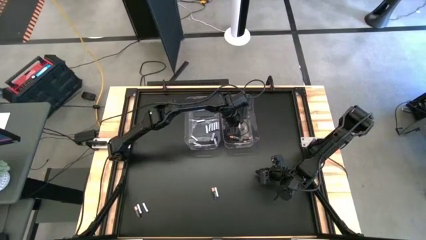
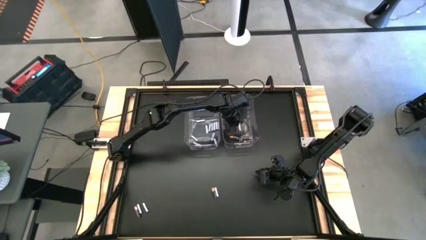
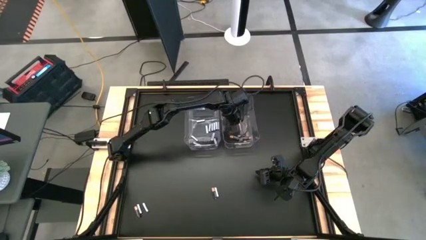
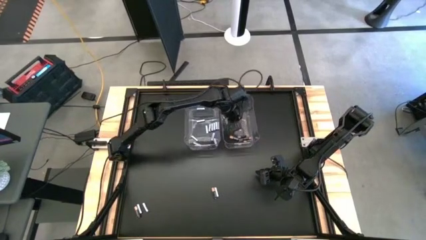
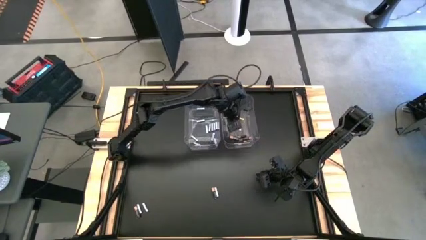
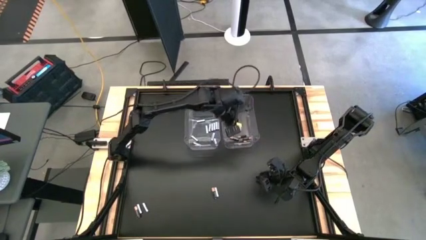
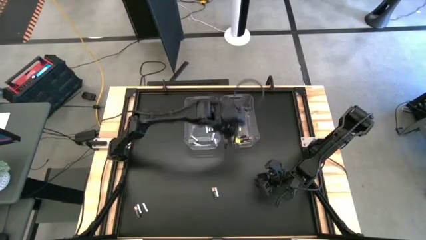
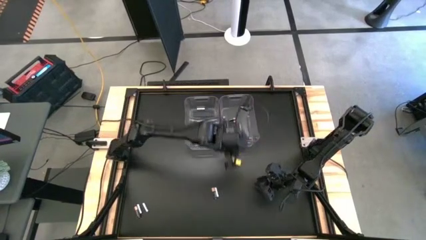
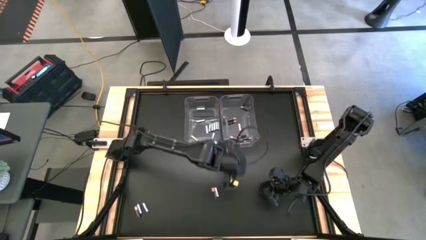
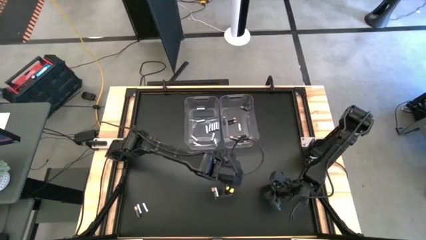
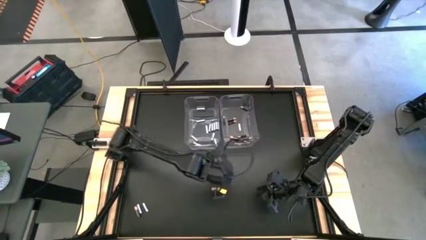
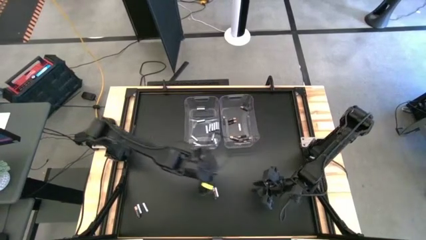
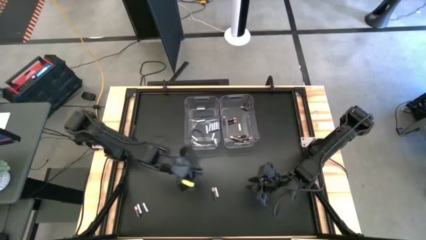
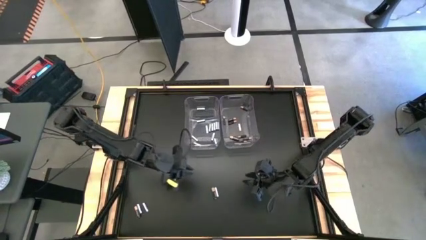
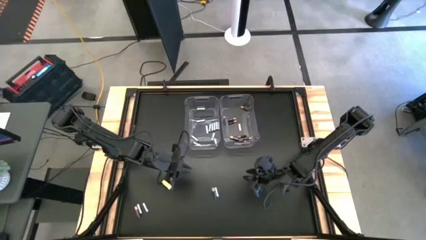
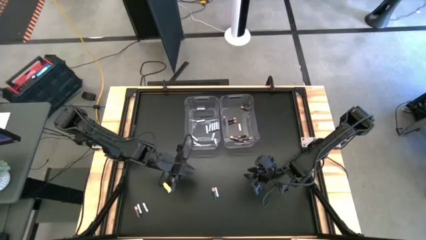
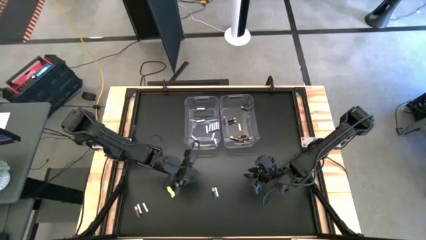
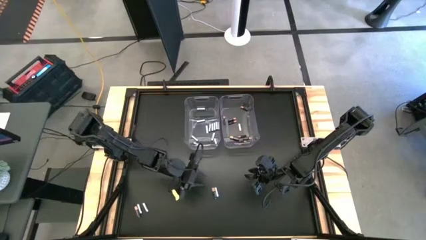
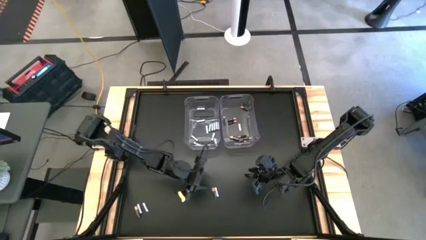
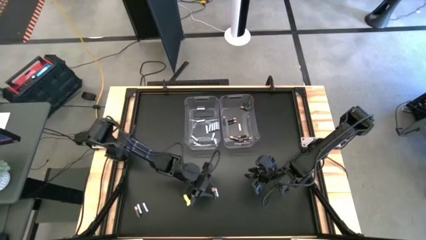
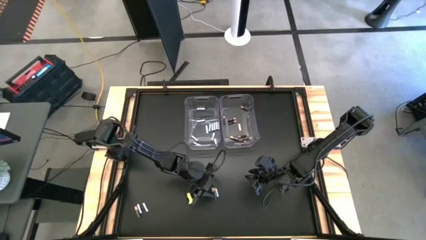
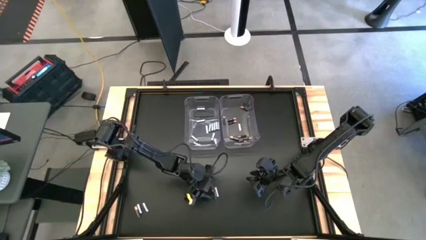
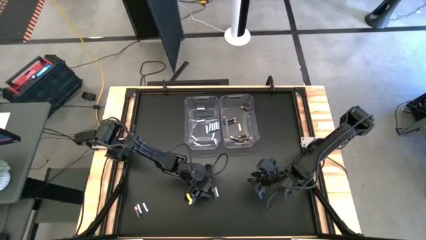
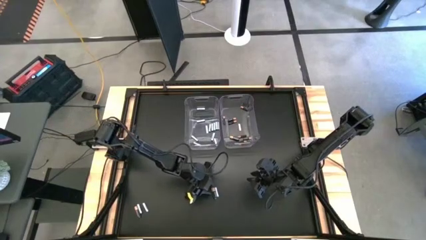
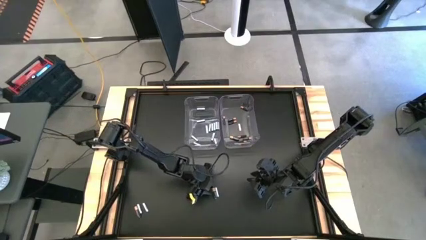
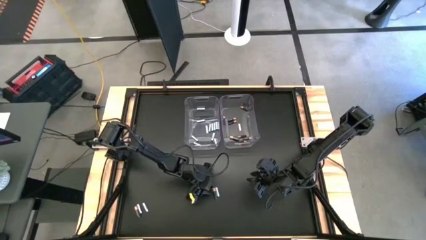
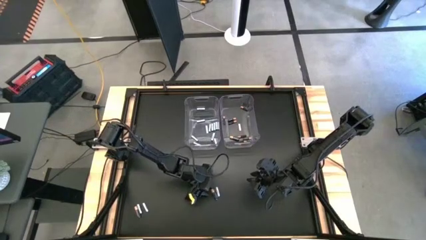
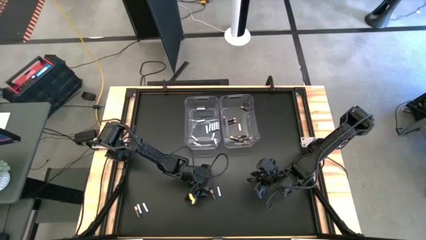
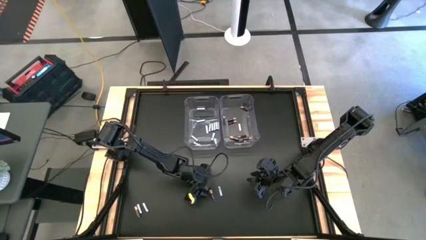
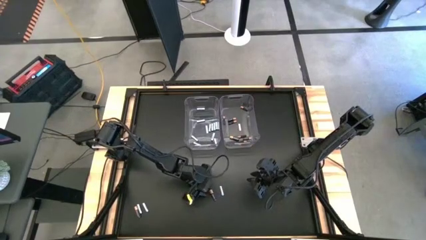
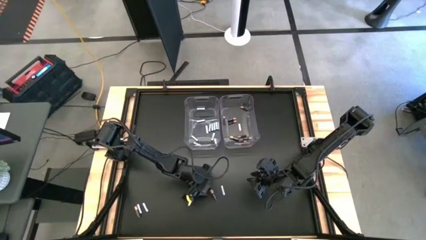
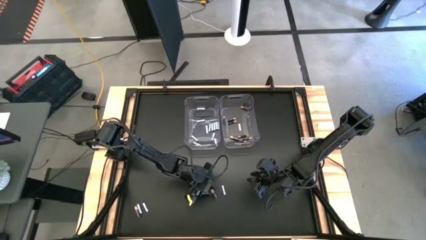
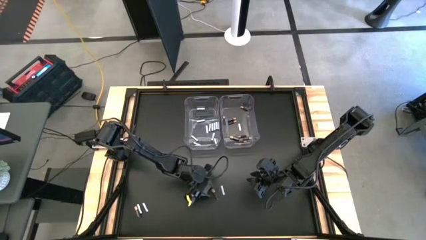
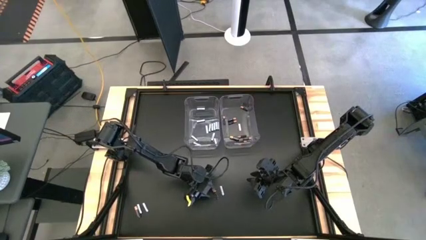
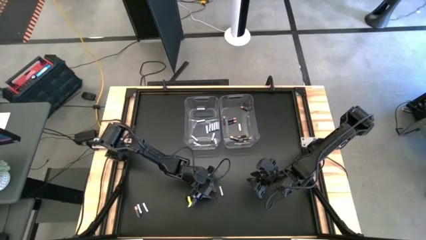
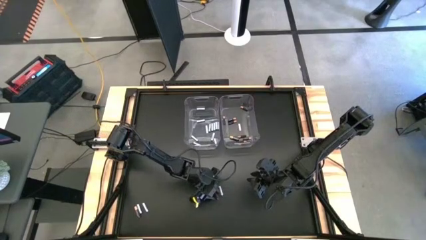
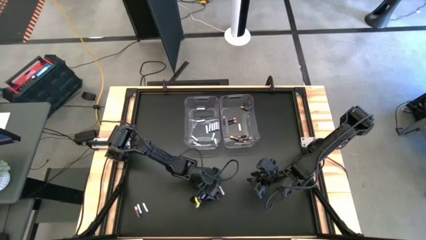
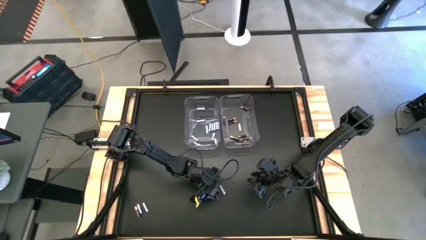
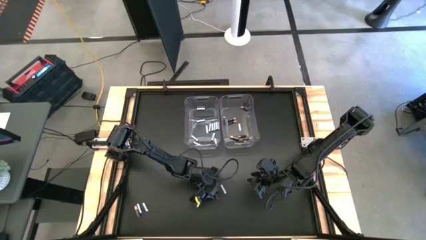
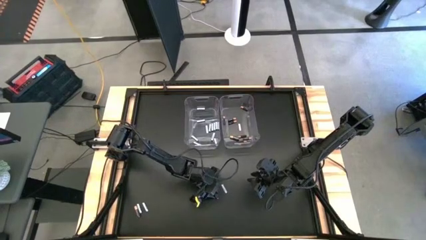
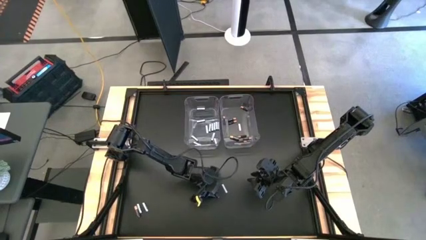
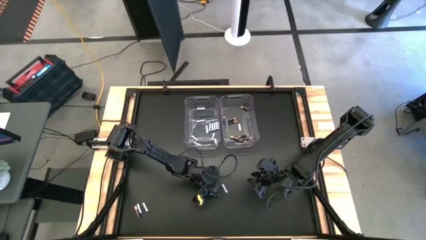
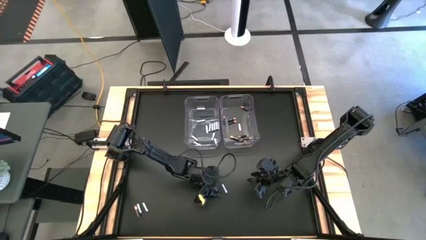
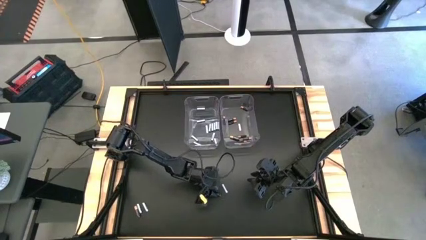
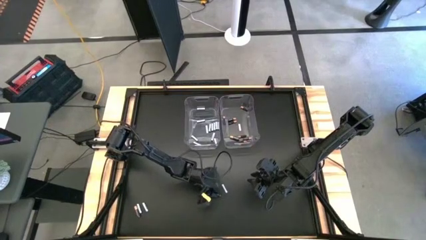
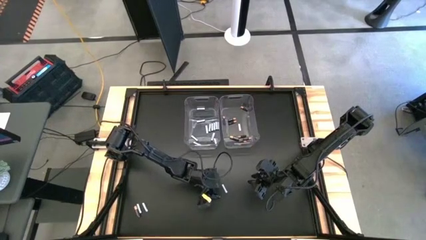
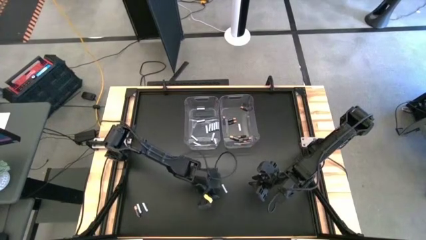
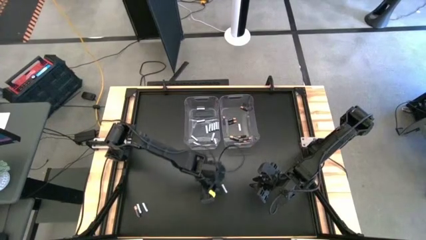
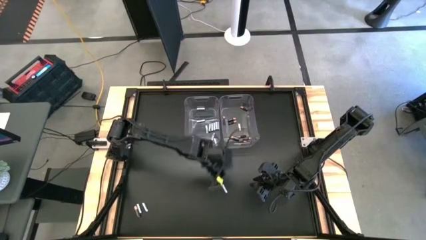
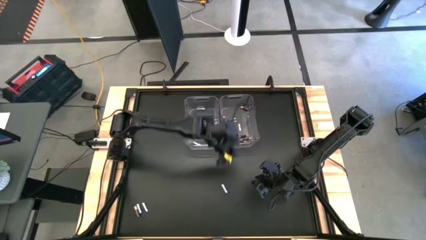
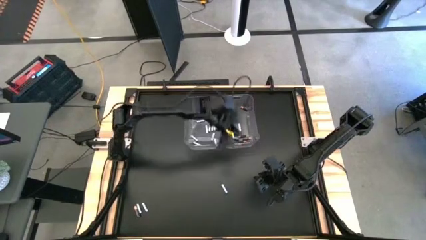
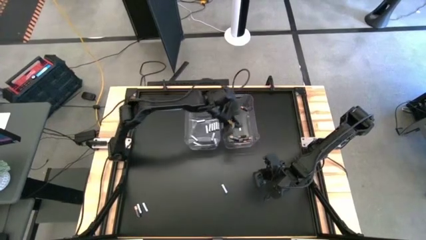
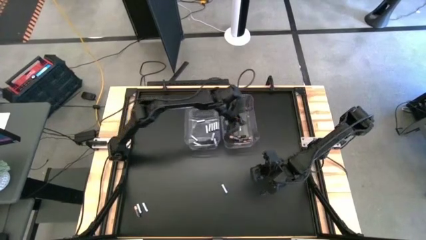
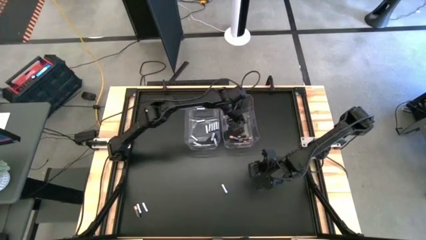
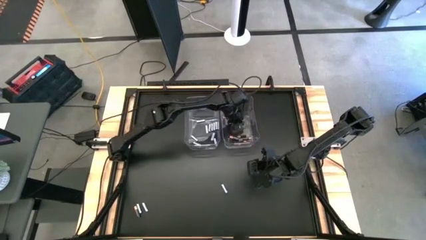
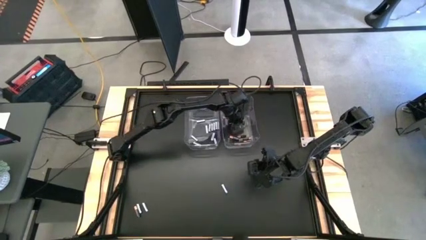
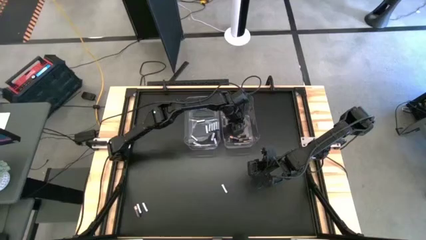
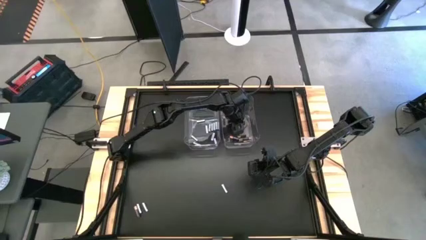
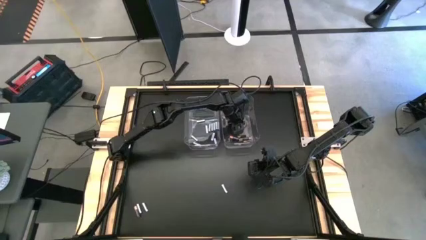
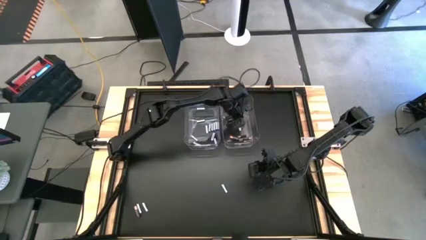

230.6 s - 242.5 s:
Task: Sort batteries
Put the black battery into the right transparent bin

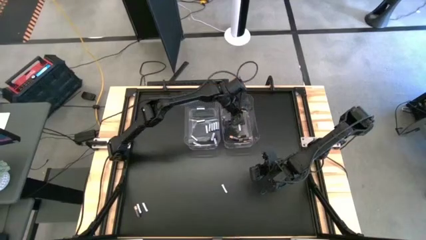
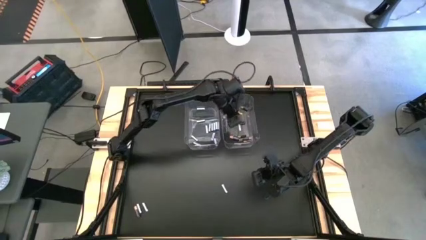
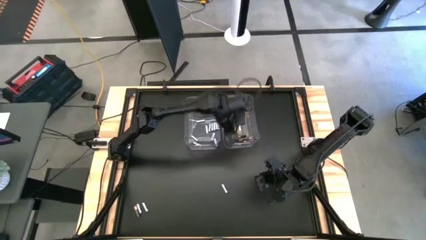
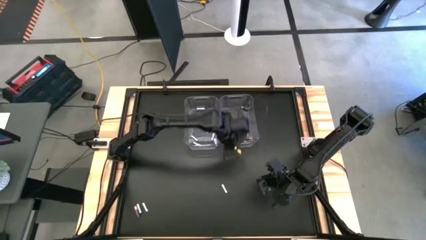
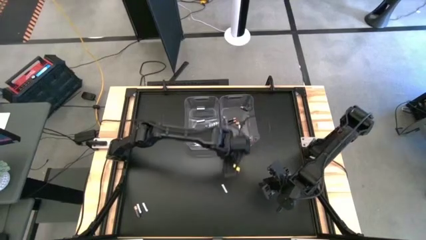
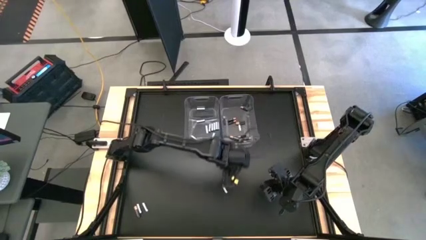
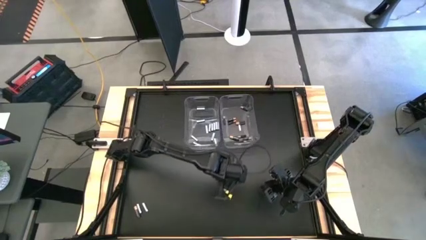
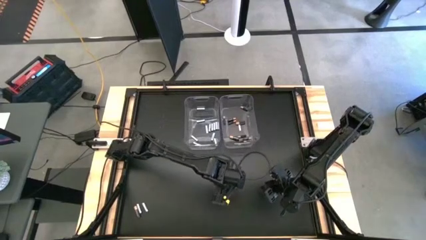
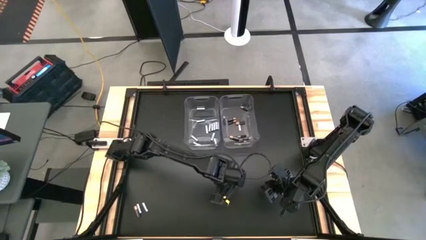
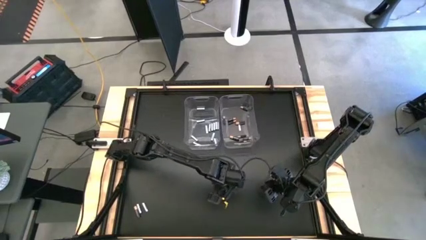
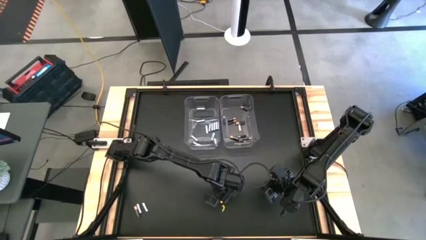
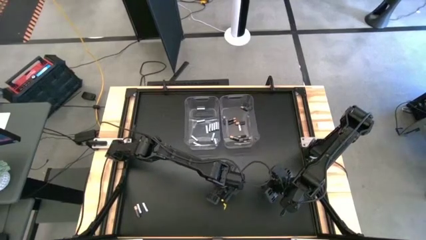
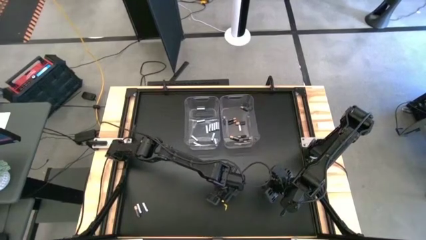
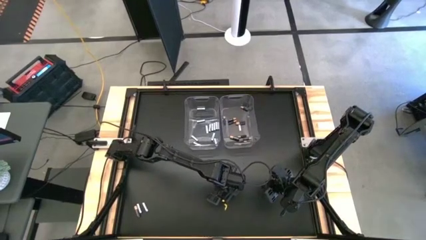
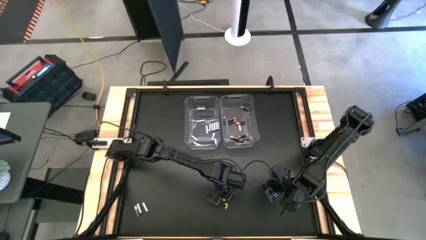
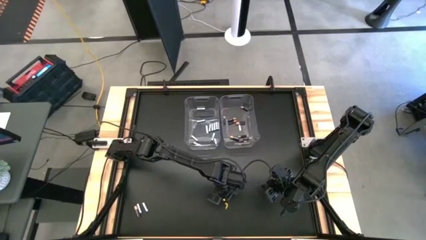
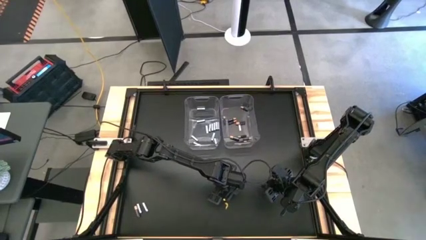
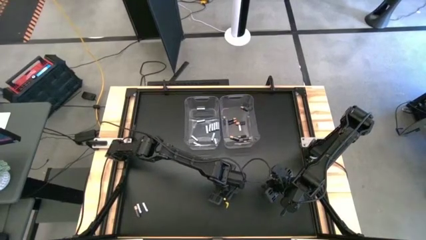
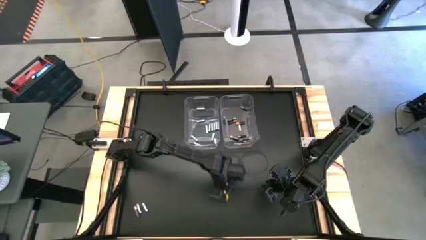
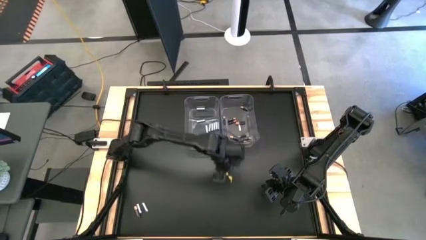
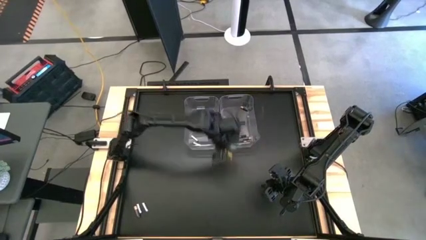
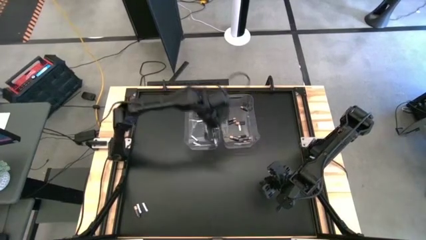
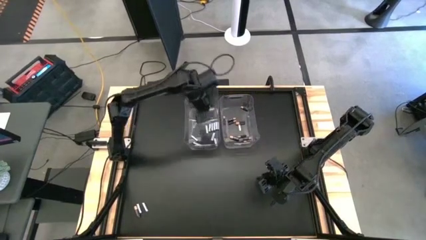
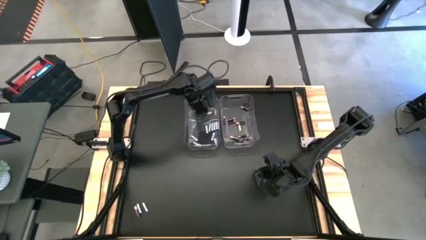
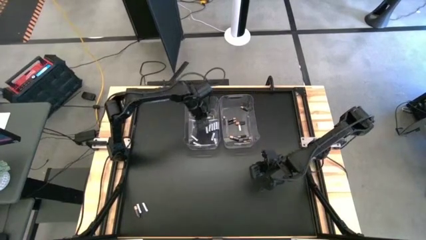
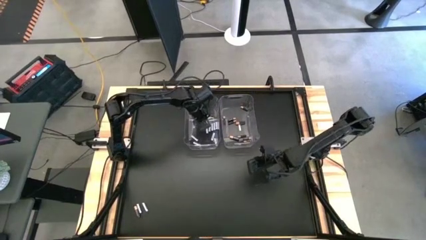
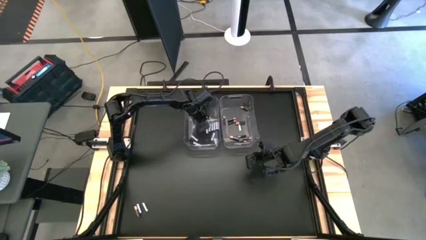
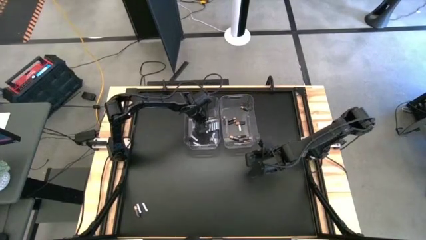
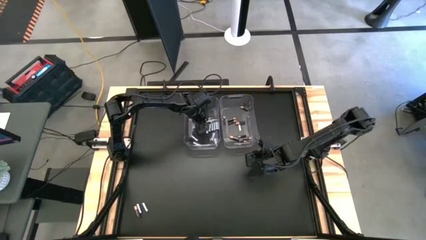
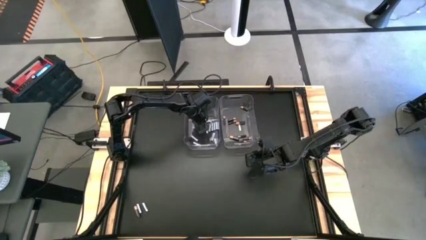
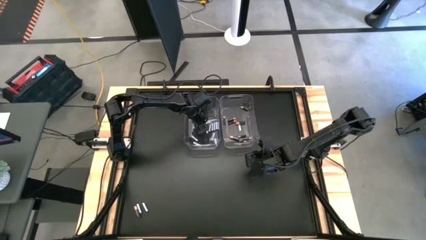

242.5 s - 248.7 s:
Put the white battery into the left transparent bin
